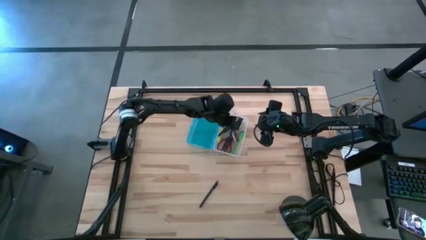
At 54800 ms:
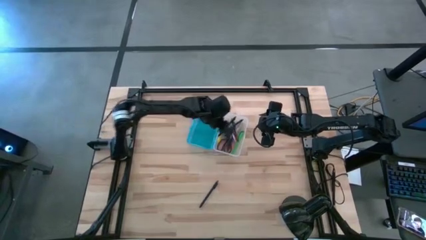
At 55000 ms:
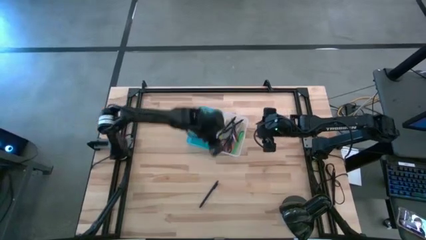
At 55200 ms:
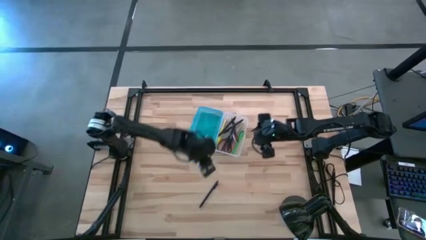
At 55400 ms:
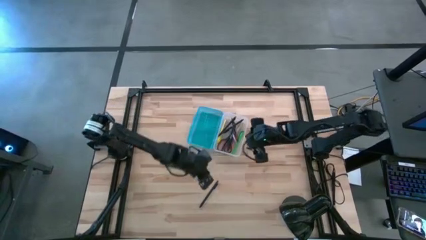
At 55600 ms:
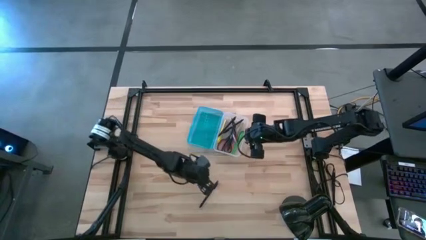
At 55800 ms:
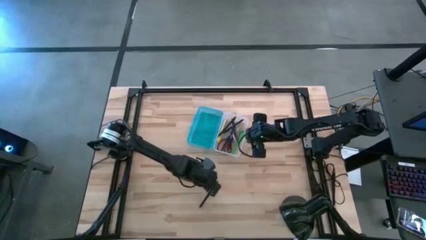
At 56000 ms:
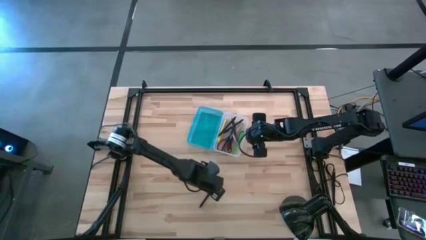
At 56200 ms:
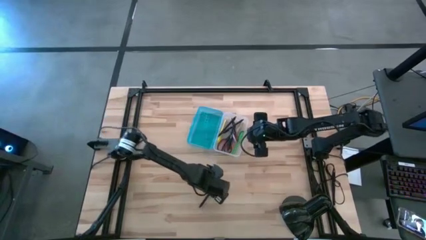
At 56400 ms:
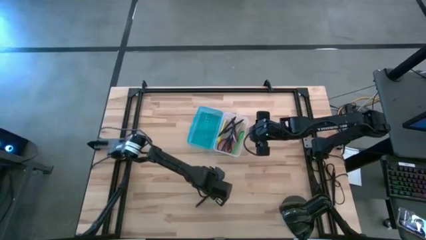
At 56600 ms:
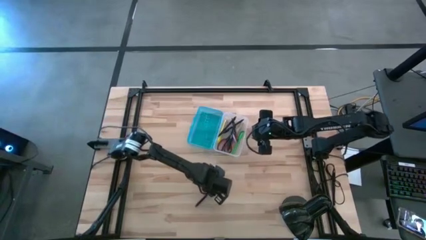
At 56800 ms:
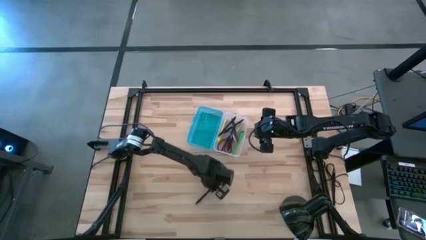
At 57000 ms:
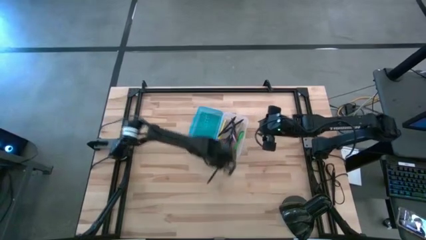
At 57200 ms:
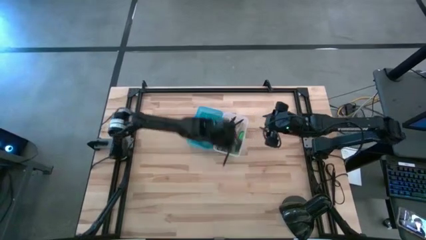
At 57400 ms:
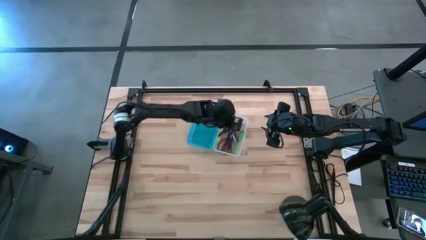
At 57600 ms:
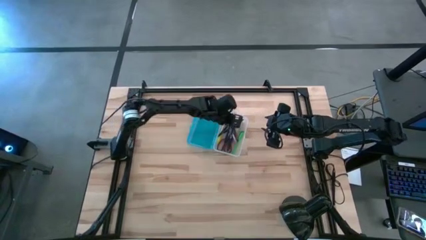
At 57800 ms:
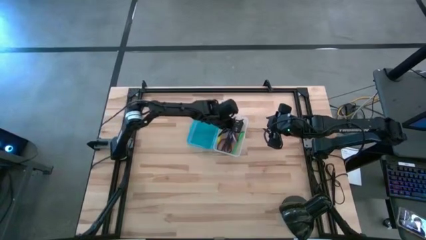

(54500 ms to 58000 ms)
Task: Pick & place school supplies into a supply box
Put the black pen into the supply box

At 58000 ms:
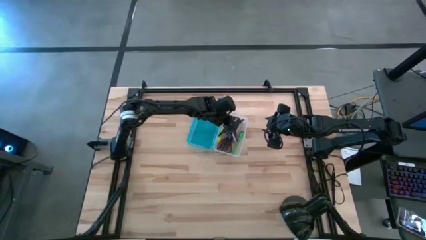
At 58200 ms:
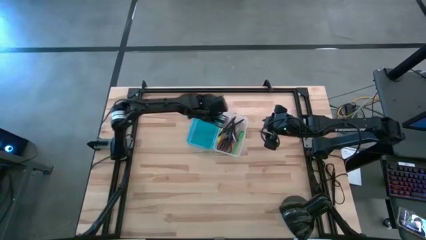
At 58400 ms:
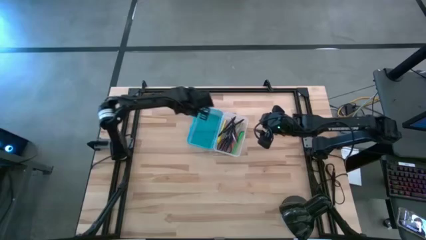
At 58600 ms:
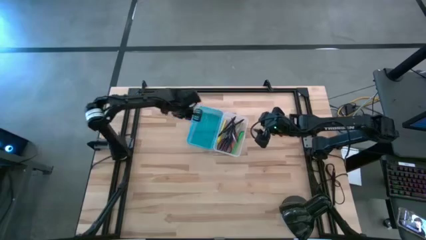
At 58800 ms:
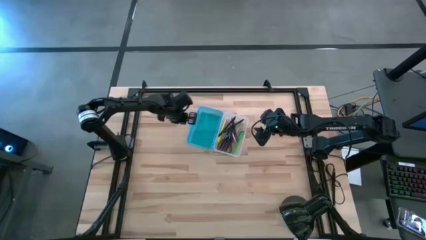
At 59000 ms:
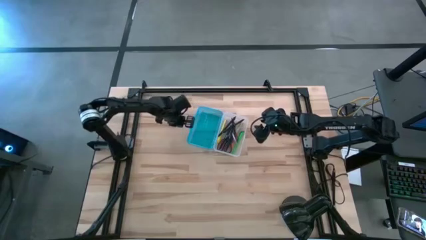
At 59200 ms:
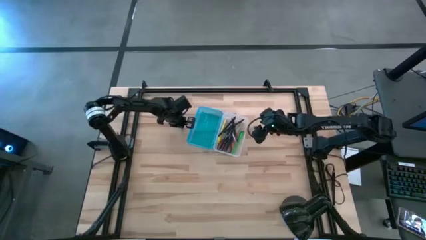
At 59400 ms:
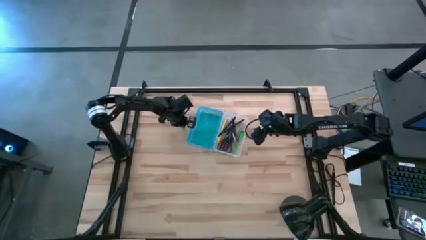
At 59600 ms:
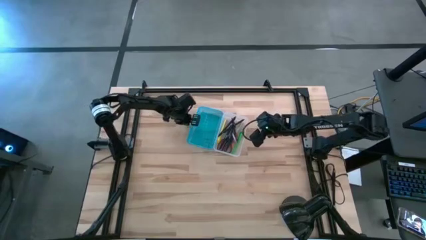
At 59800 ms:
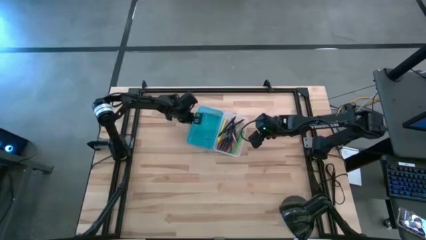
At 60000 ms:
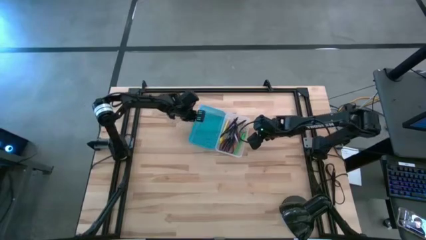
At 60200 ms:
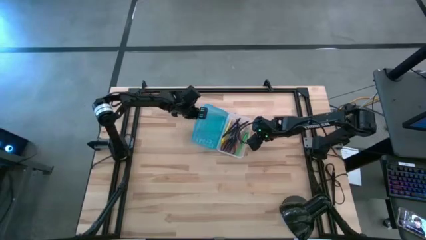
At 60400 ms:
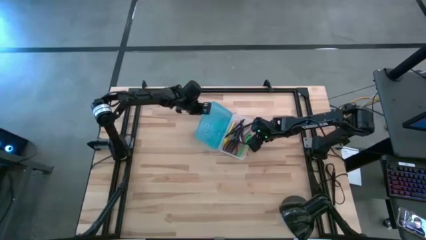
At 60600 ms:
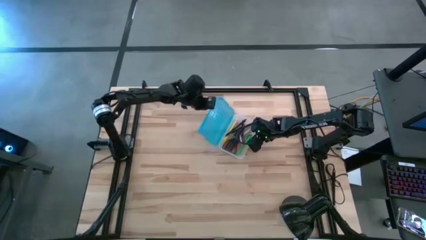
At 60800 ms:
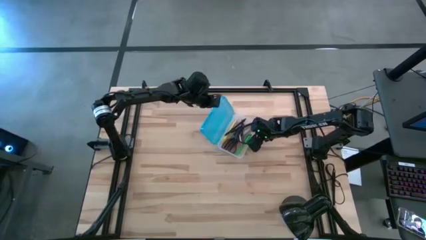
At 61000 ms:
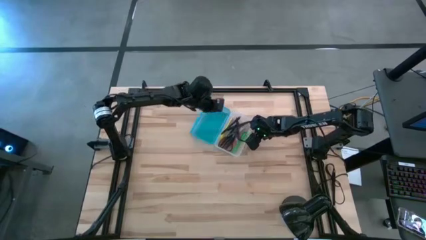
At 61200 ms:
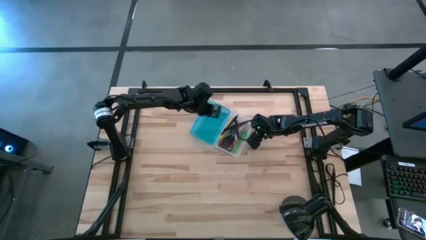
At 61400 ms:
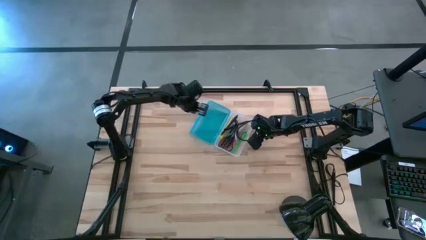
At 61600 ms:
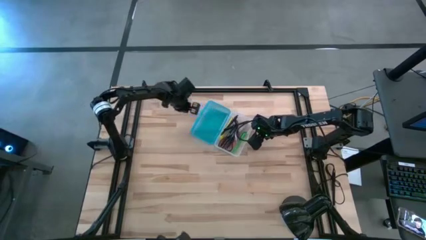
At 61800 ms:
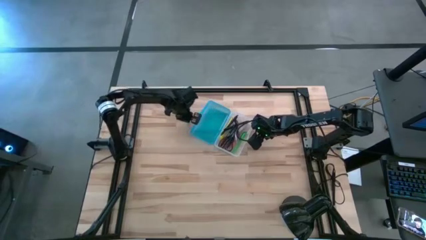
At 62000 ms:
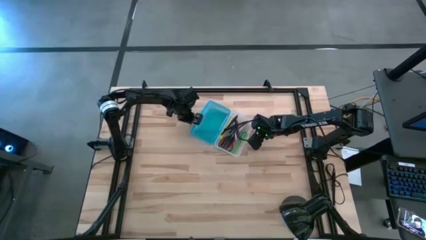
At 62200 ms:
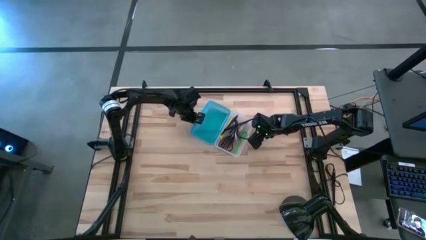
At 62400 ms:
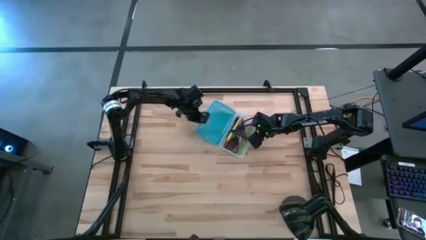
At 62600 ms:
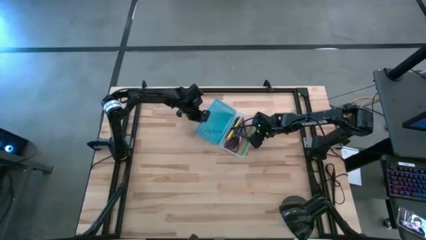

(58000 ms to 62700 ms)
Close the supply box

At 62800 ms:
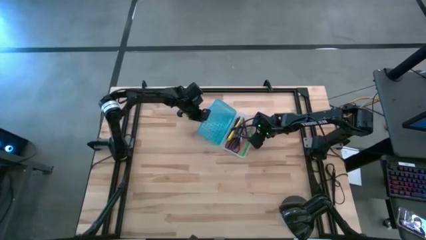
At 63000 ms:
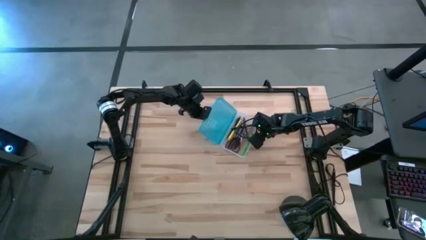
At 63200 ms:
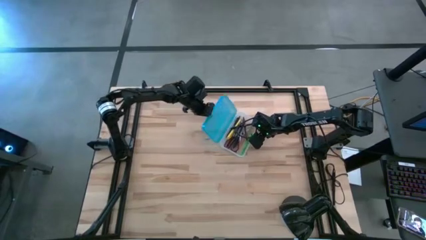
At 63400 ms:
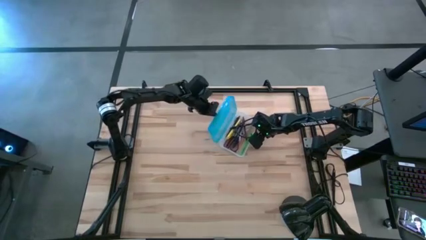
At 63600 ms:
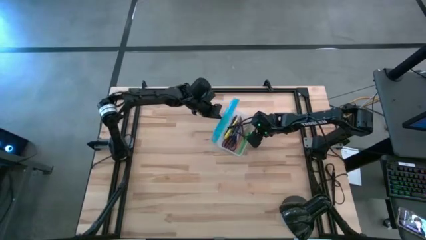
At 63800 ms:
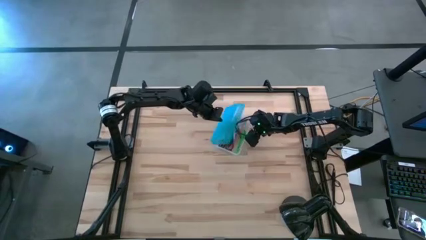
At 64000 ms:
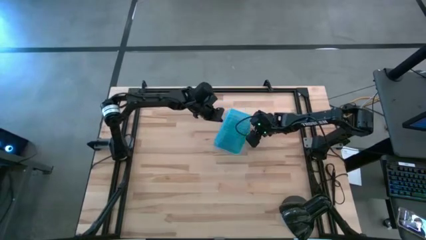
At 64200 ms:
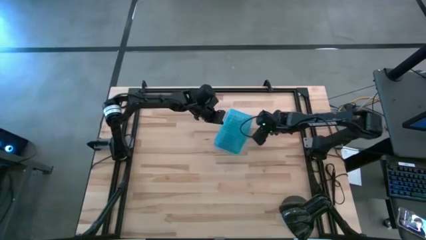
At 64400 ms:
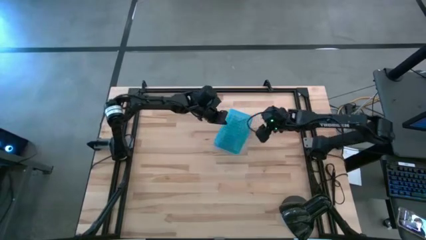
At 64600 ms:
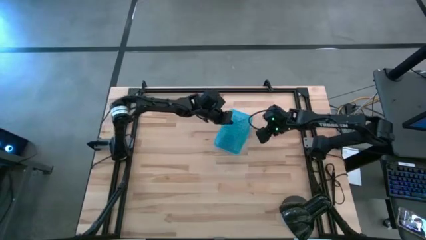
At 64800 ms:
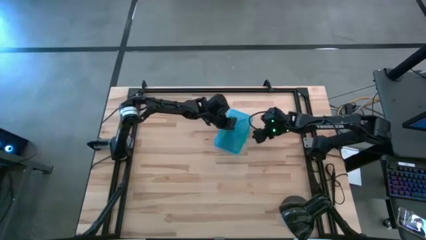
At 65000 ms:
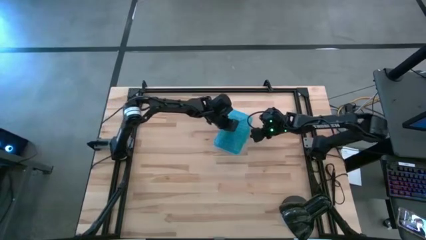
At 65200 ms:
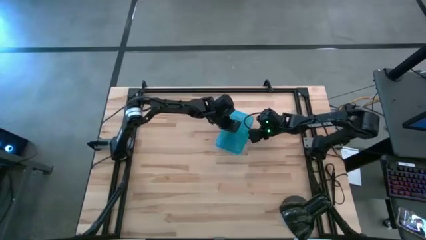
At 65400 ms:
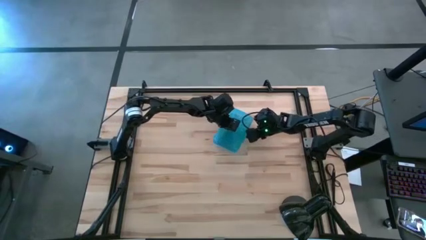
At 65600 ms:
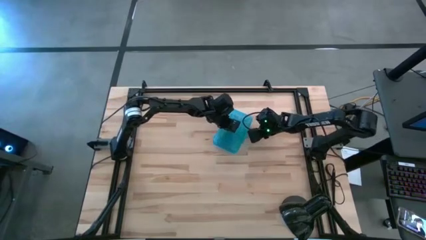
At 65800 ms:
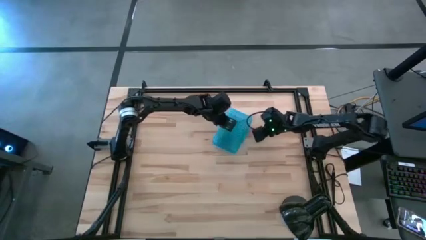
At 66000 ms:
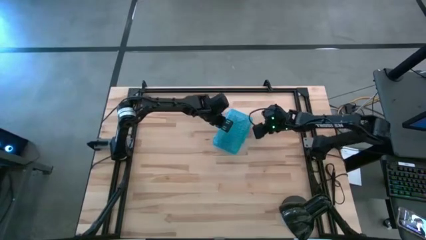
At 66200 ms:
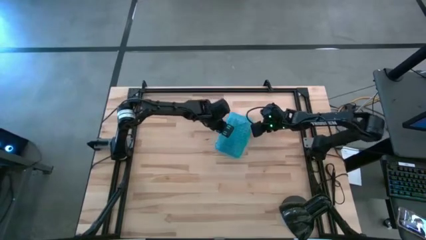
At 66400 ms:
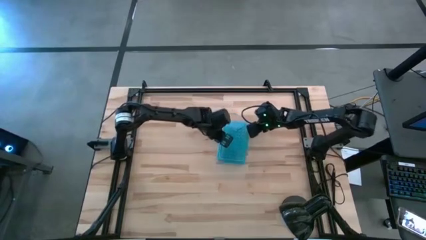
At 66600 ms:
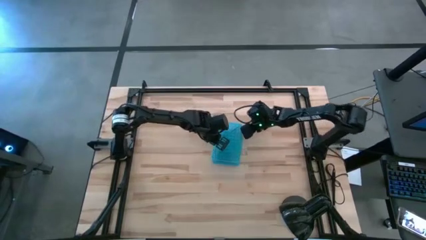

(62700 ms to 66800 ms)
Close the supply box

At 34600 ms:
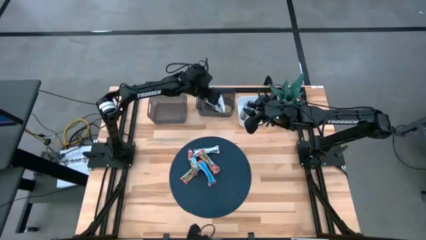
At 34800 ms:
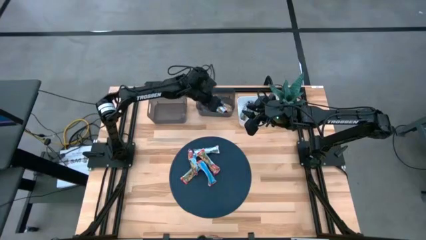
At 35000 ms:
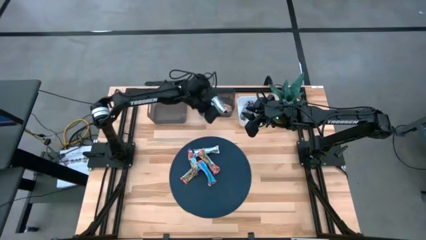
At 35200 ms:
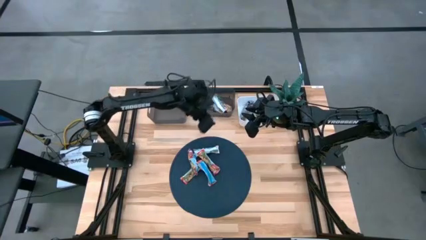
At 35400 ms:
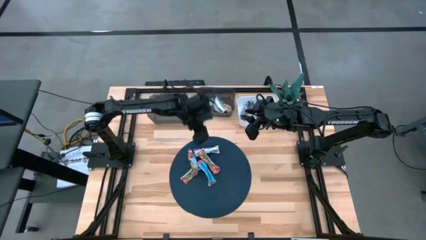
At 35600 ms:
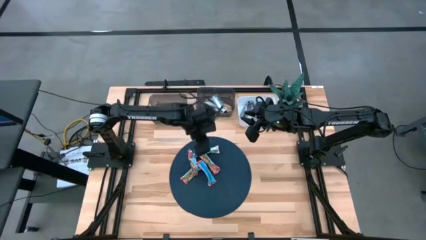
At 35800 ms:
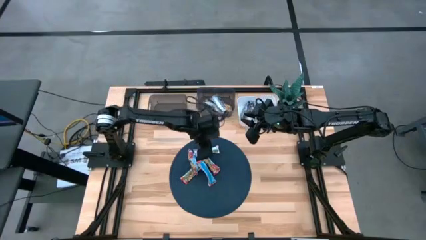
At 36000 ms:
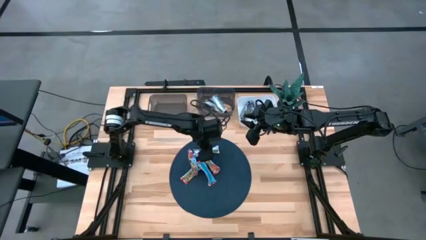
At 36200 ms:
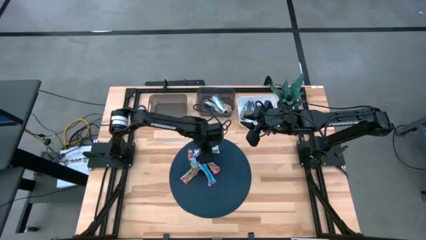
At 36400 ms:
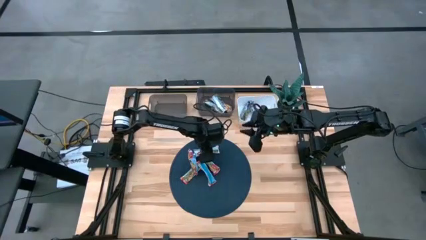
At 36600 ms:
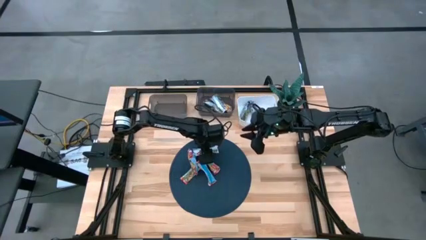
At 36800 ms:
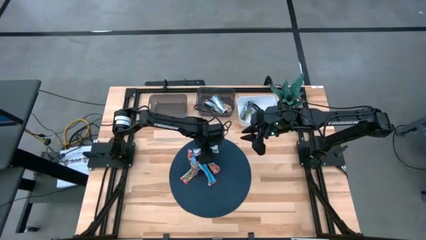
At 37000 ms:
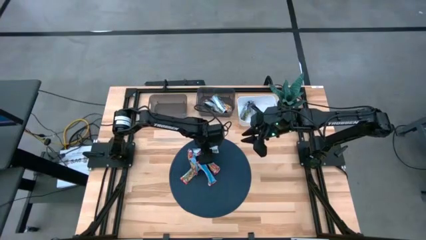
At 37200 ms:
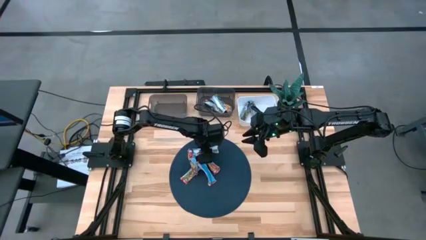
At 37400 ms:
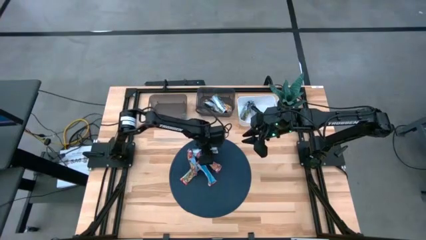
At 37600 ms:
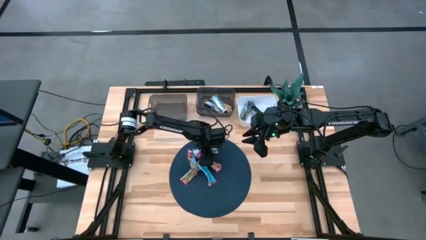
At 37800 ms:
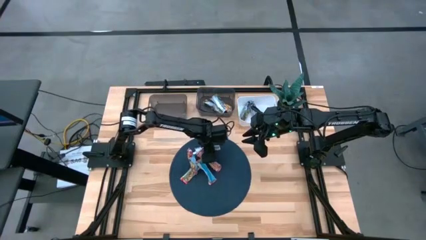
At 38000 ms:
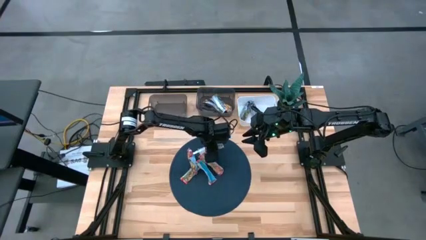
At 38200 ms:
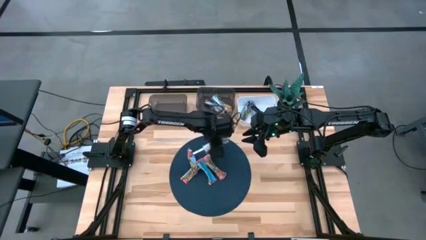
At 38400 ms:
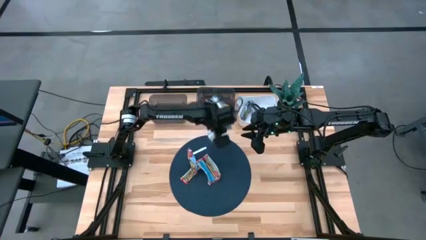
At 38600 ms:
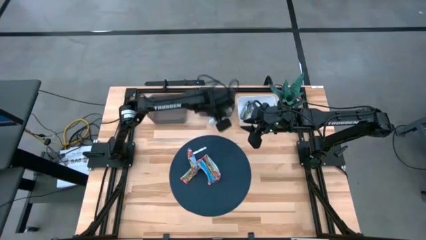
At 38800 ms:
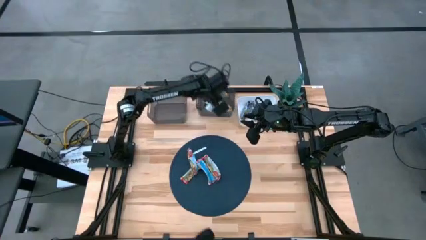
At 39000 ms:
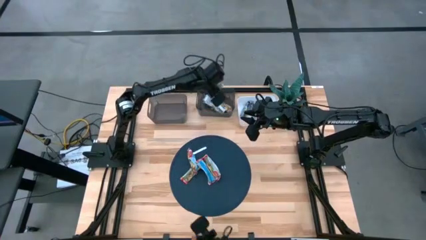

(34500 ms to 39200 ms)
Task: Pick and place Granola Bars by type
Put the yellow granola bar into the right black bin
